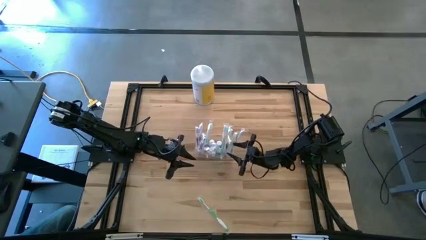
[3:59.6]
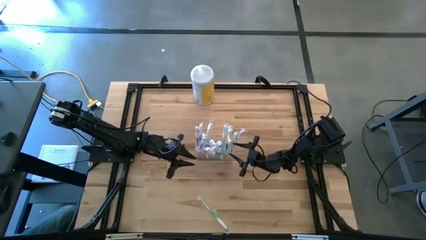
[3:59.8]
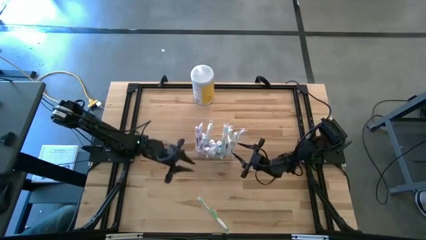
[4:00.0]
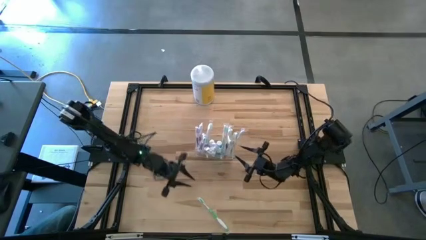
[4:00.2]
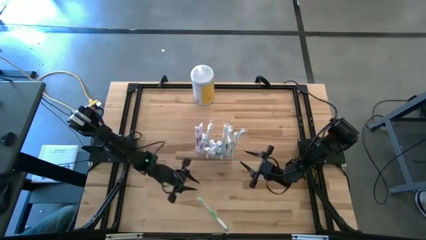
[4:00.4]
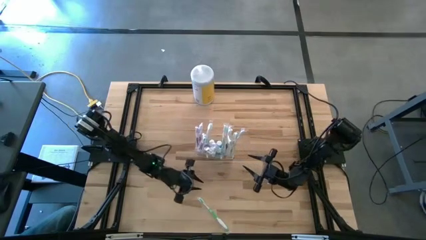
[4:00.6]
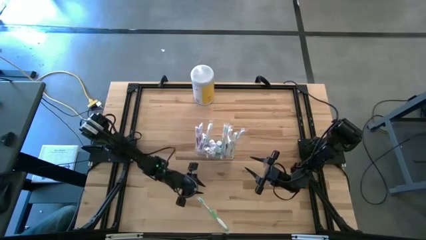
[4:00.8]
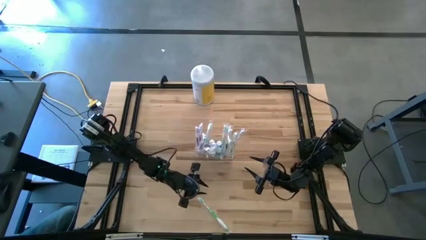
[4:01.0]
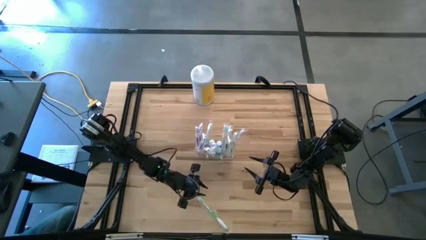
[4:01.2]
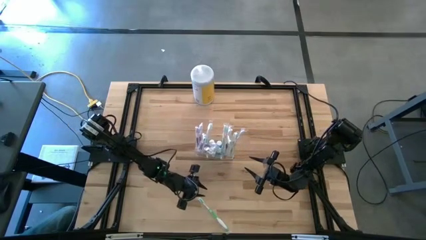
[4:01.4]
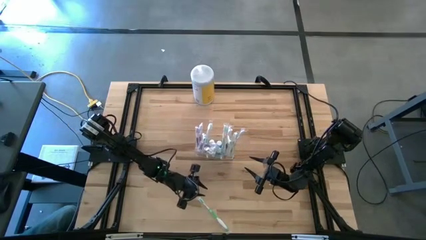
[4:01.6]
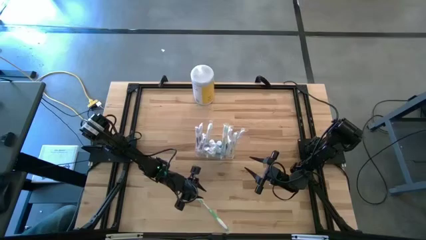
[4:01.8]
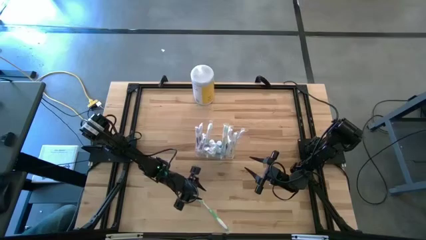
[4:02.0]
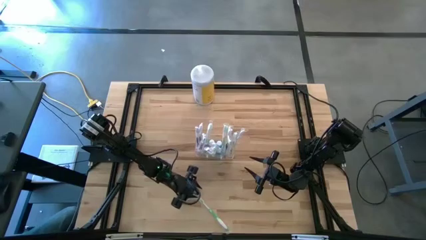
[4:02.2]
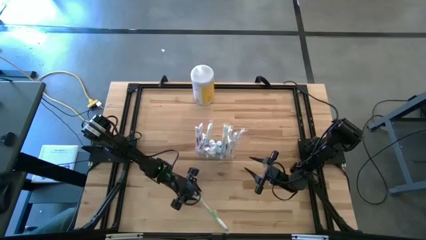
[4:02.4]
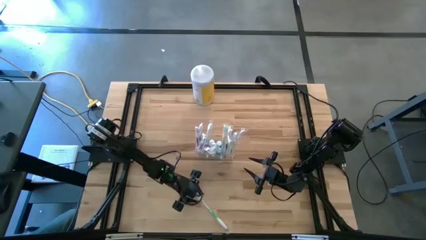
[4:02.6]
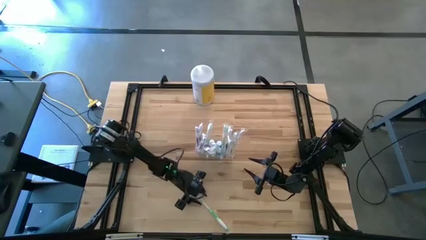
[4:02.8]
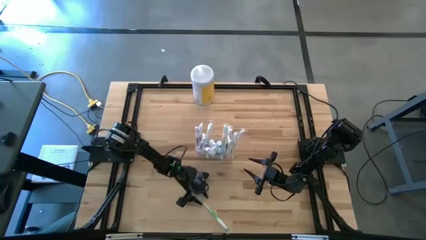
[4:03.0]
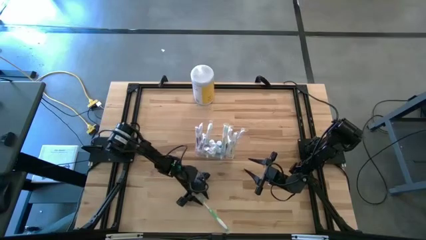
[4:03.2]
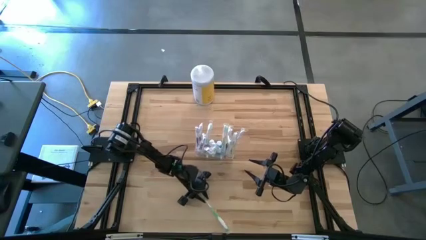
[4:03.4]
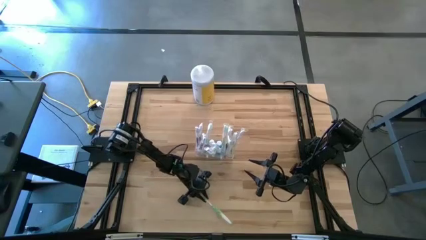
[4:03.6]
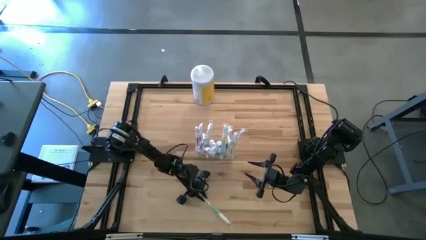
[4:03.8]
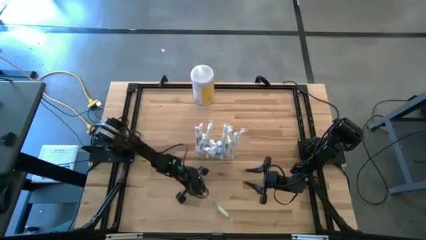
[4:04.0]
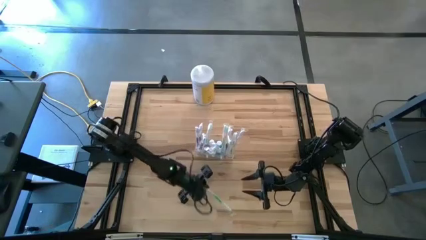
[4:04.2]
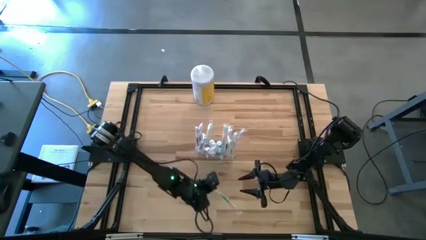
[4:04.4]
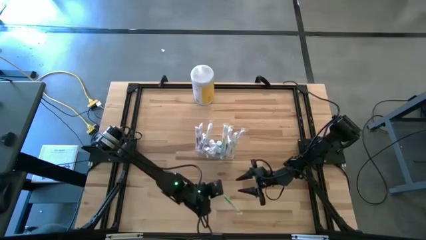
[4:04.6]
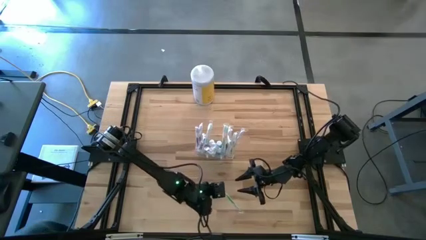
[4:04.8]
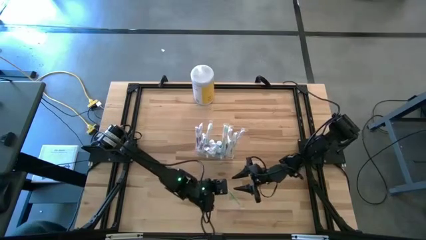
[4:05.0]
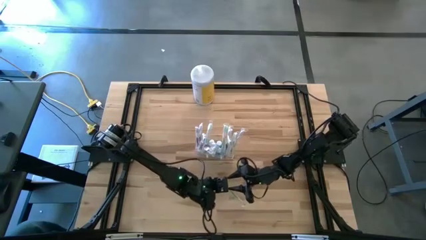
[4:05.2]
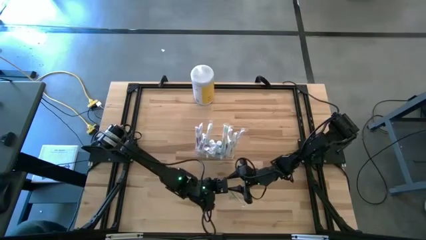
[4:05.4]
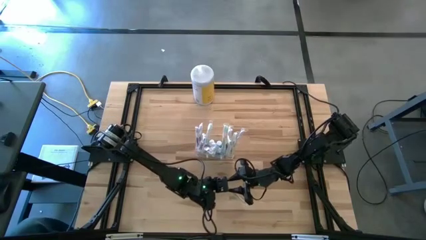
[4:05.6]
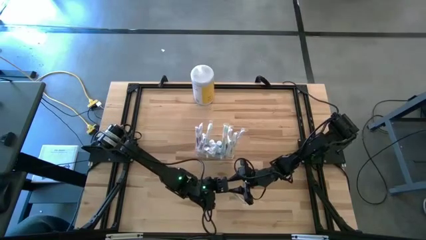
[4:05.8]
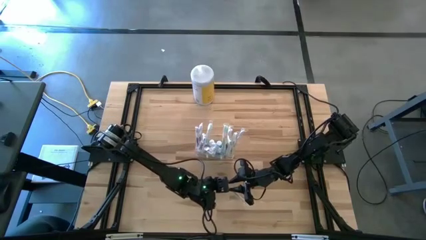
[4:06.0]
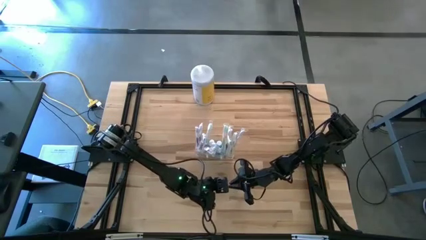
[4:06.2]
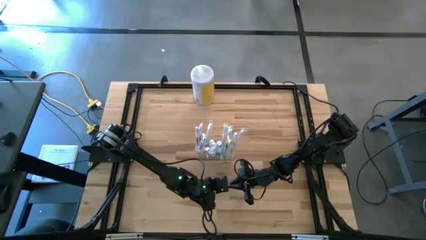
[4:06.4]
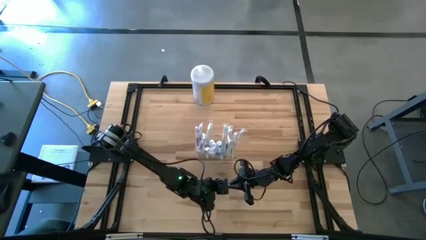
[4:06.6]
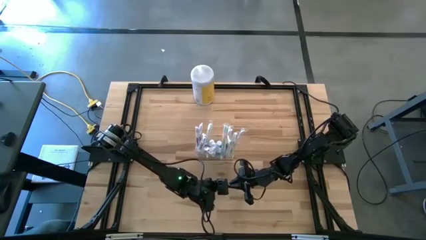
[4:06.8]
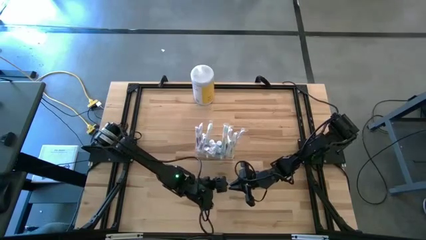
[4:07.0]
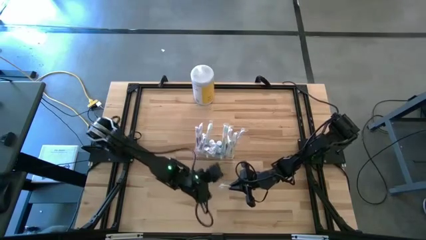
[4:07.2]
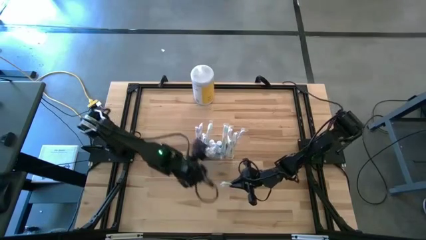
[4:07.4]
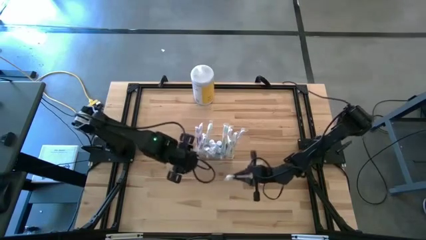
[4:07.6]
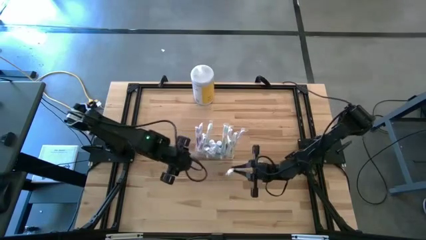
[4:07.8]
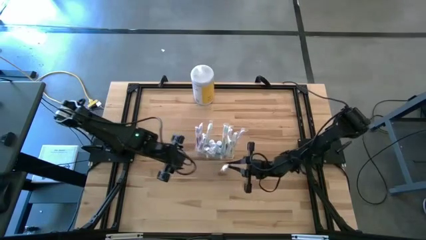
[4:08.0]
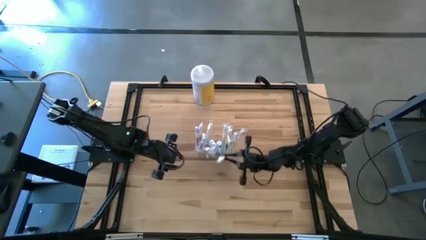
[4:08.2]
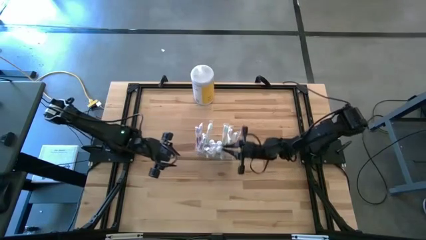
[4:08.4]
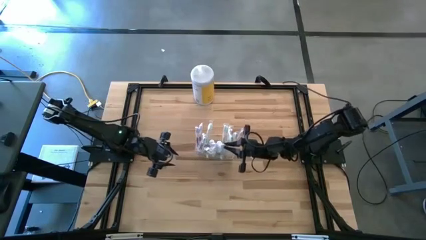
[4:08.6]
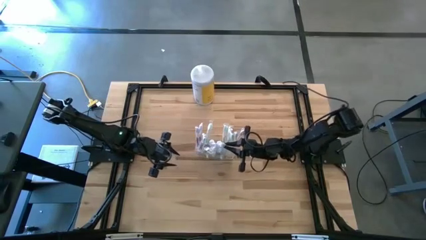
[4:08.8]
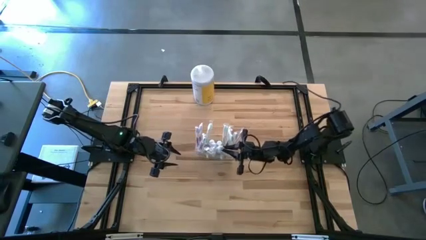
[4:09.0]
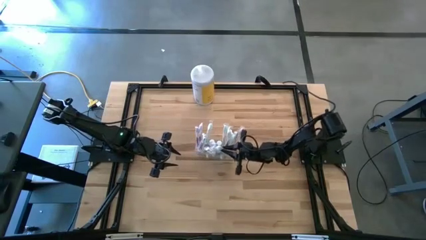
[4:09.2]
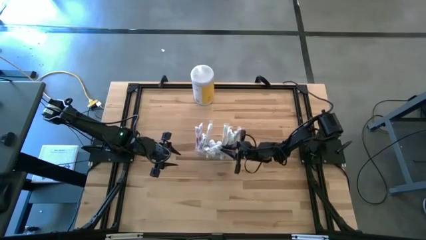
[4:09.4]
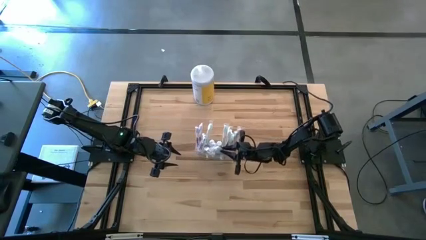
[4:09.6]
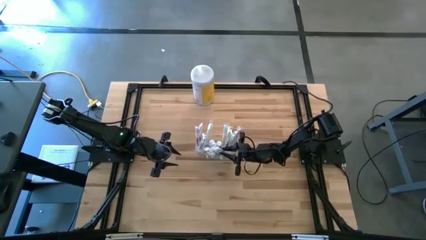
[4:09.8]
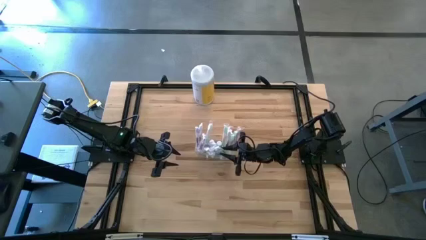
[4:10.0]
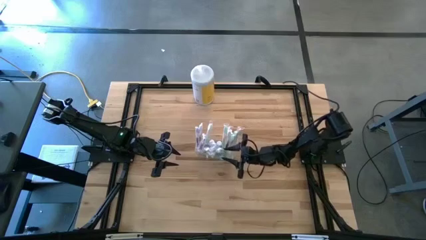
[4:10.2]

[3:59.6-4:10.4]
Task: Pick & Place toothbrushing station
Put the green toothbrush into the transparent organizer

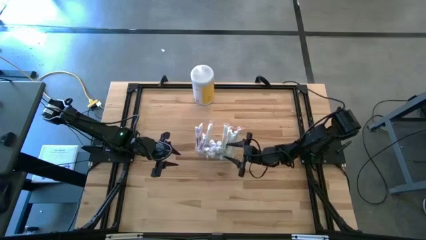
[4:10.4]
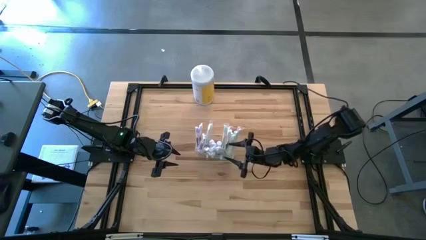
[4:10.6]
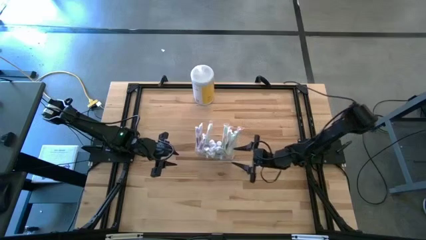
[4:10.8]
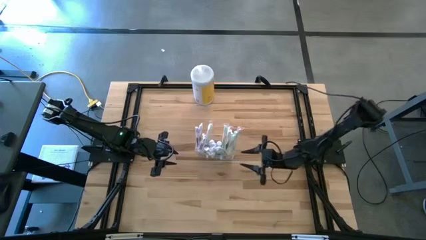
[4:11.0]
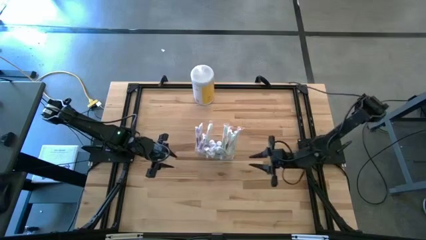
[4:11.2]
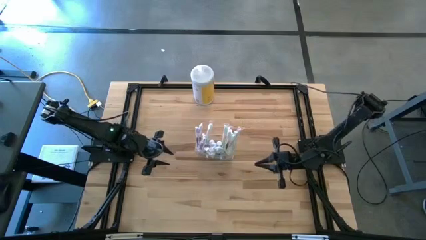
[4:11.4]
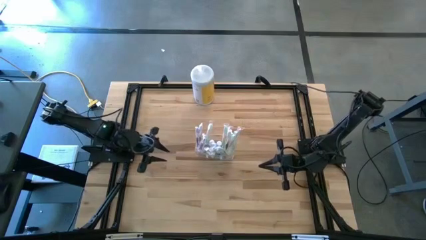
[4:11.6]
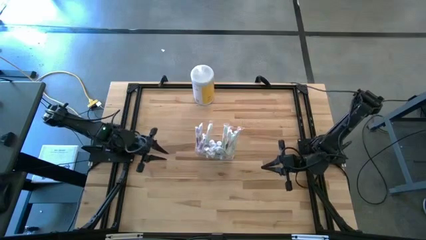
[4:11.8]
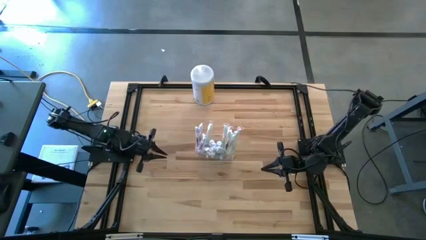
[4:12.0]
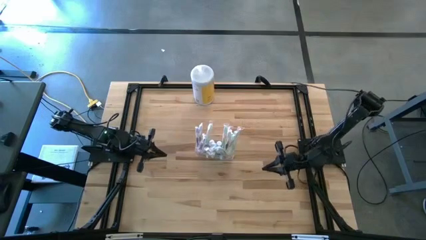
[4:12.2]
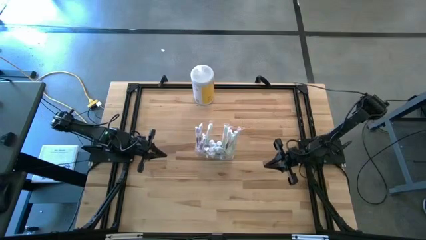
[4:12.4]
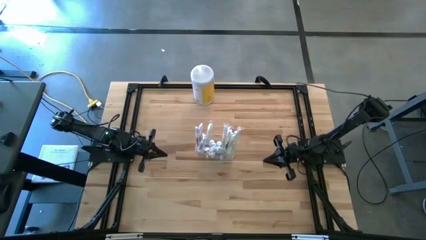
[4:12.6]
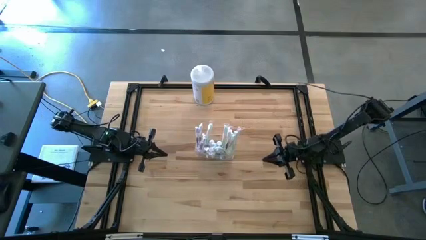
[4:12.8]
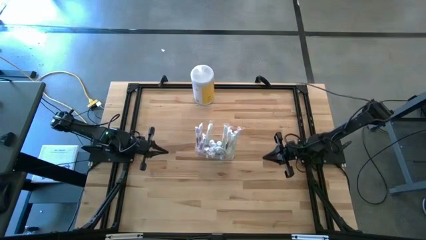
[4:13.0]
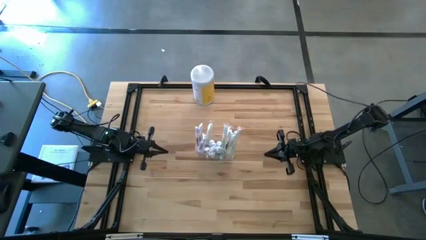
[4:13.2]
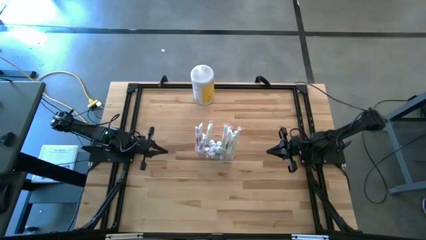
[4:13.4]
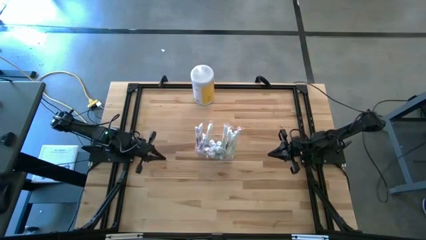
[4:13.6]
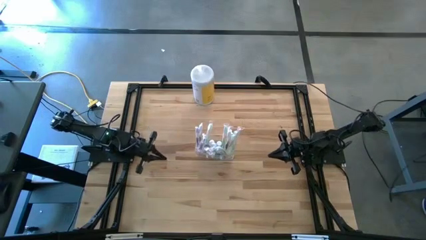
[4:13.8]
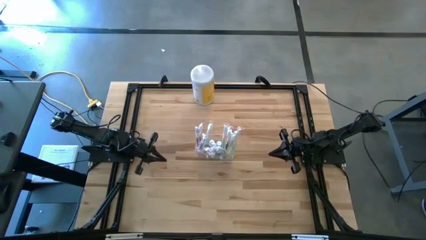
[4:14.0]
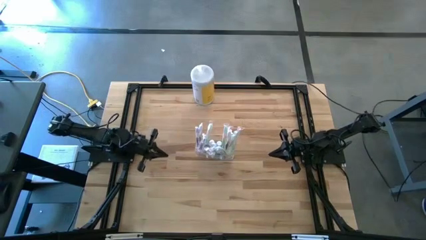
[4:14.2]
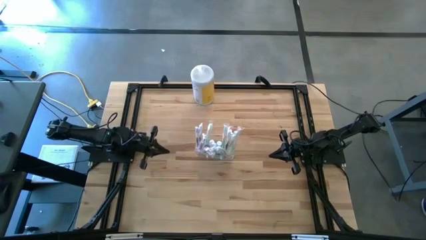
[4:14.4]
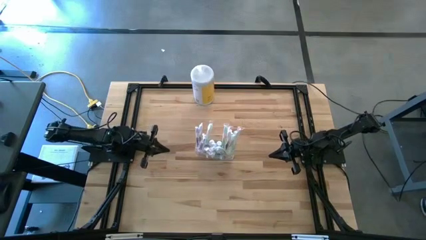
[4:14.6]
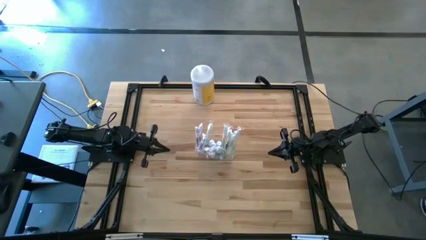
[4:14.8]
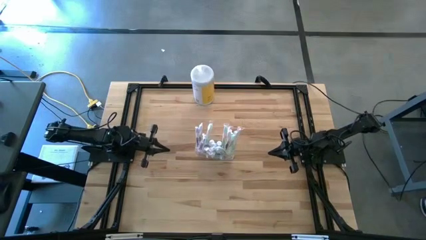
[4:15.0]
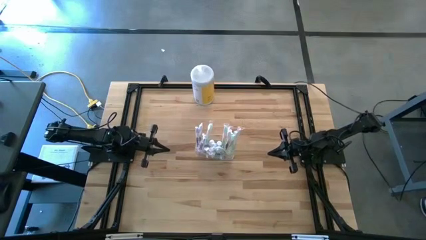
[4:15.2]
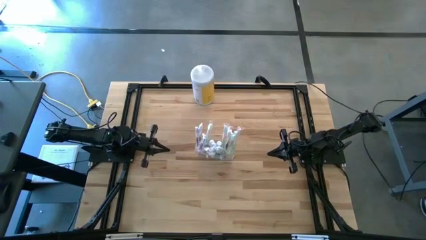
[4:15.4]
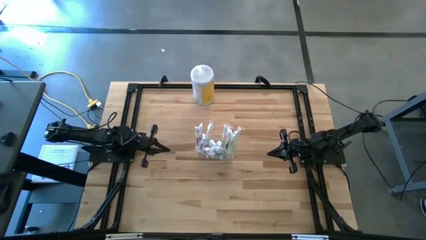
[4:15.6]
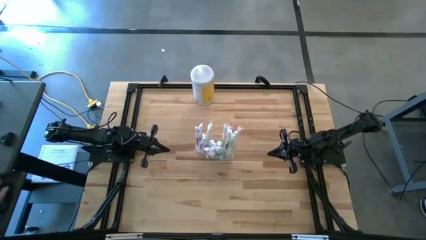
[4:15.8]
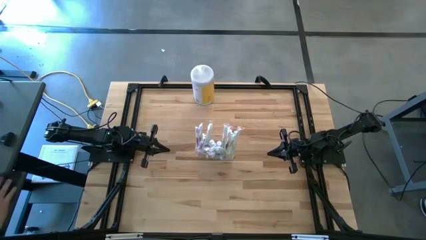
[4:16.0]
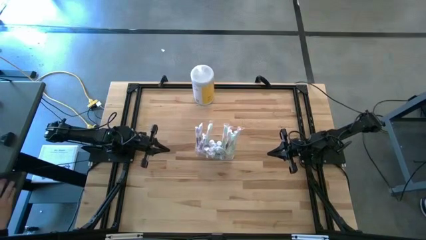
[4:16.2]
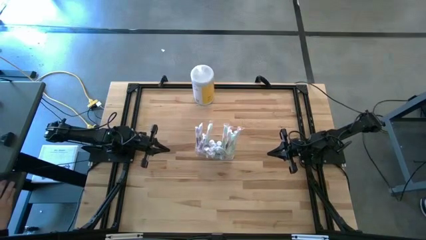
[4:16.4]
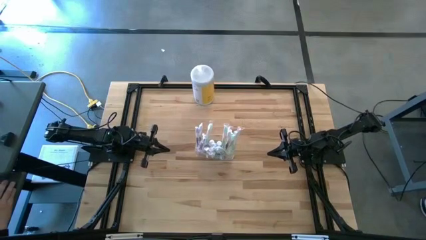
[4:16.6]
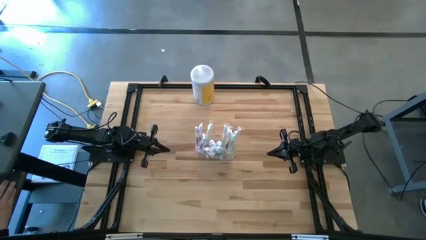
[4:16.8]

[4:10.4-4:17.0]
Return to Home Position
